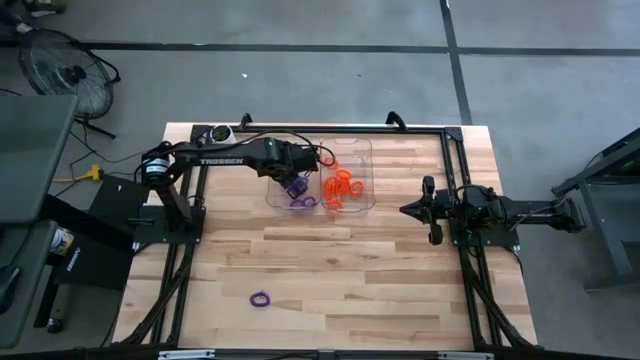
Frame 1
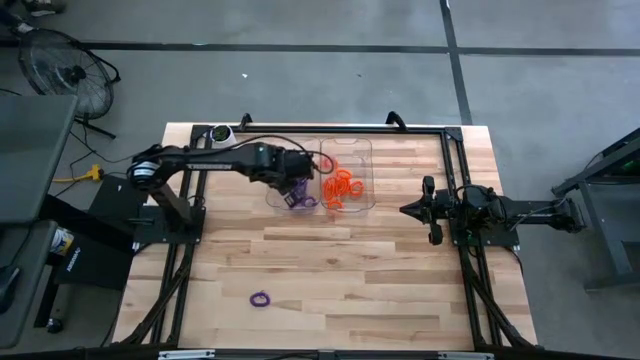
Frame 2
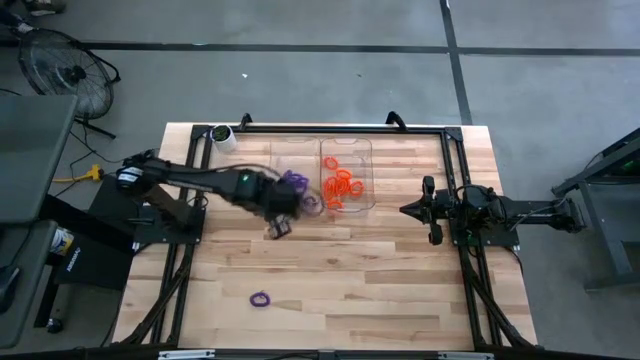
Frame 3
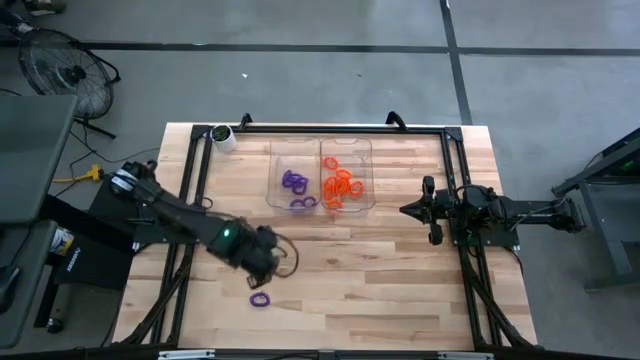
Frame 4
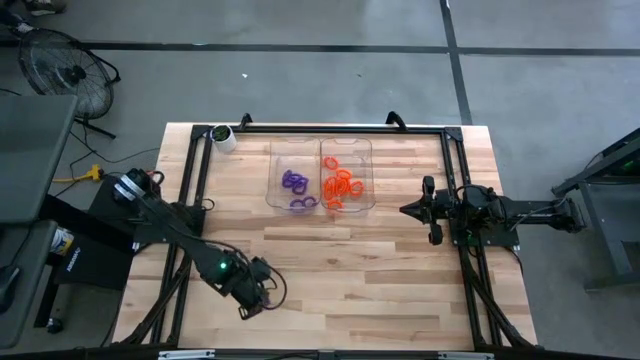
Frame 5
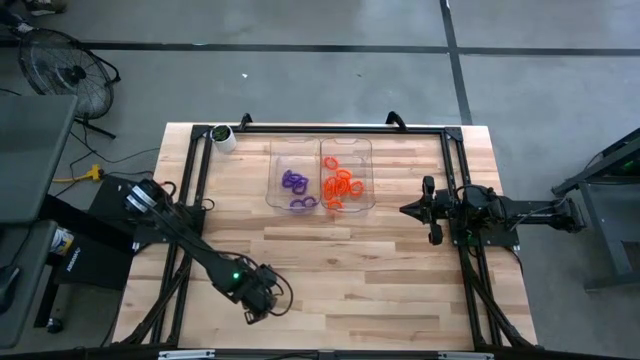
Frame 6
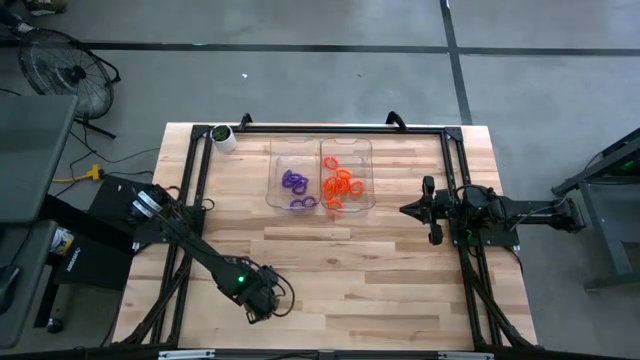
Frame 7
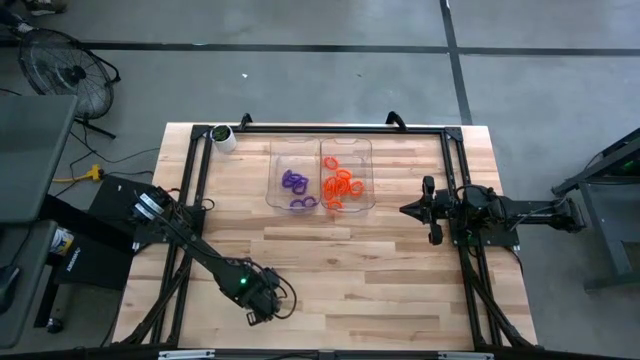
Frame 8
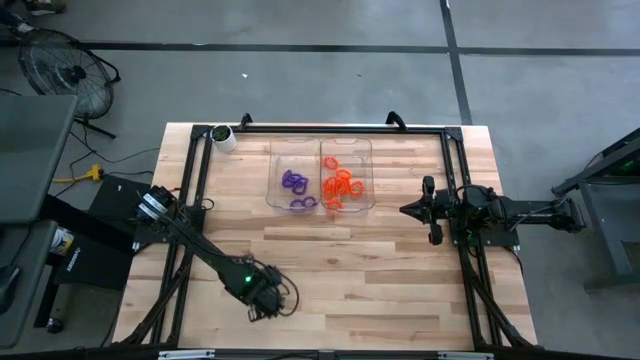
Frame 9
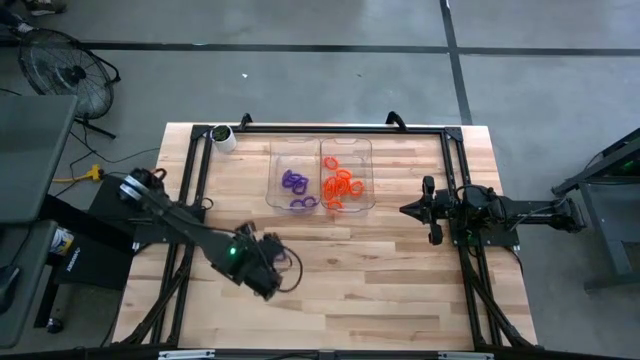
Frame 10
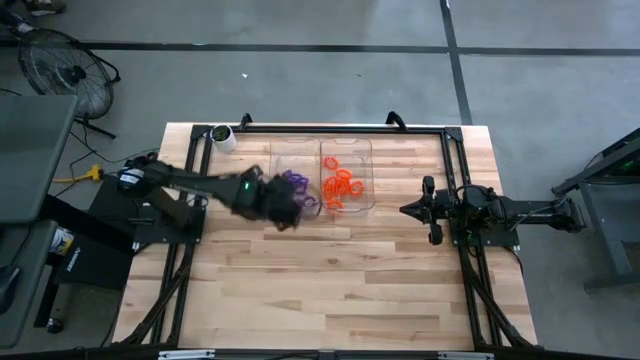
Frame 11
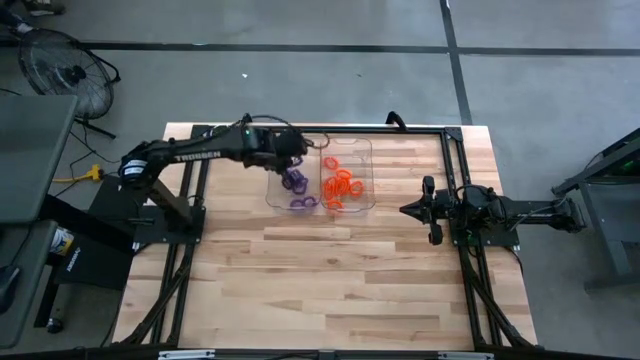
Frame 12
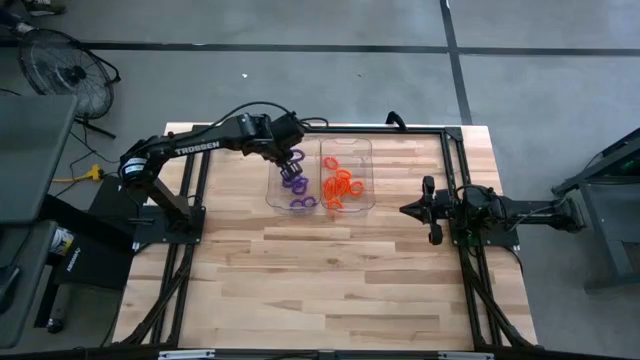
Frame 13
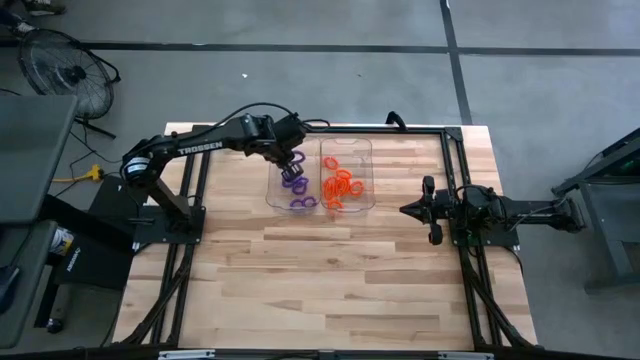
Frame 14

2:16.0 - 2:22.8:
Task: Sort spring keychains
Put the purple spring keychain into the left transparent bin

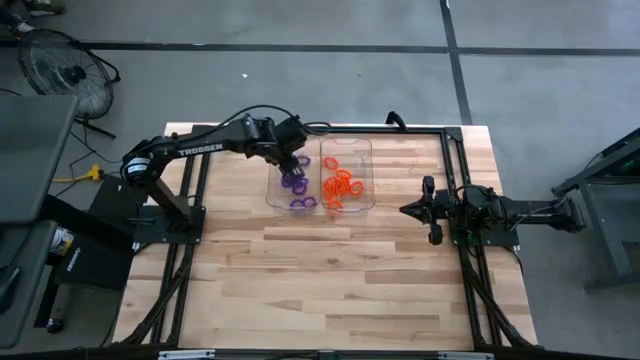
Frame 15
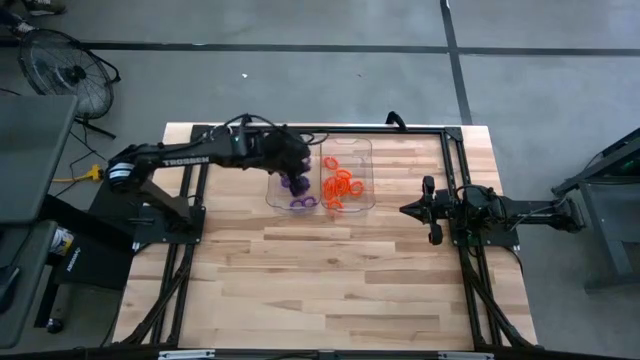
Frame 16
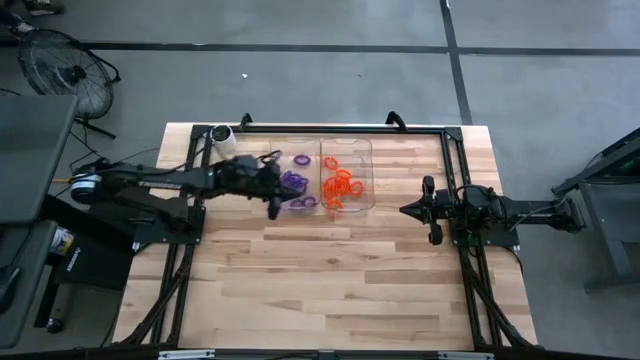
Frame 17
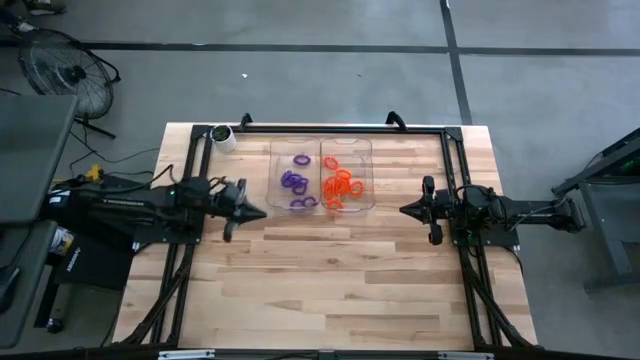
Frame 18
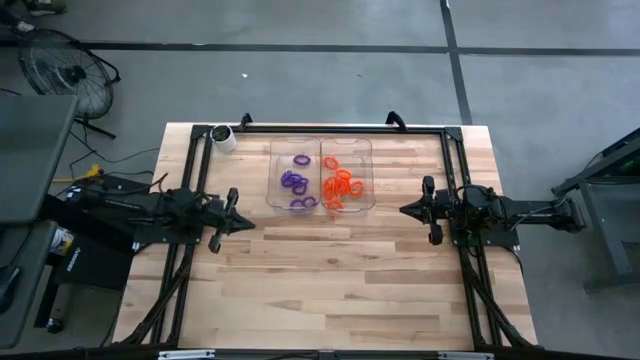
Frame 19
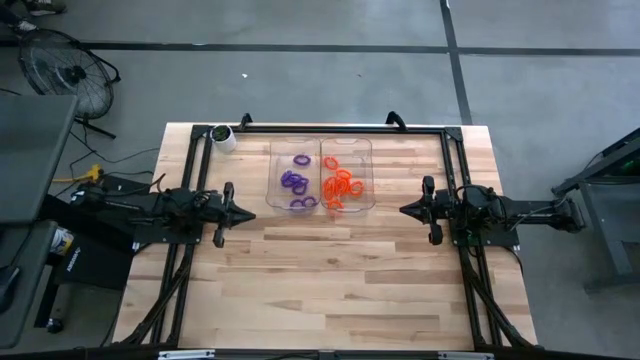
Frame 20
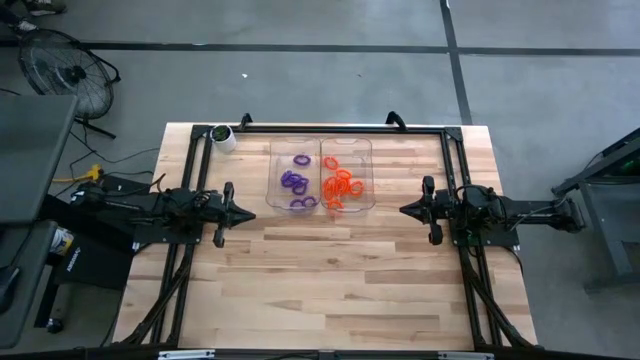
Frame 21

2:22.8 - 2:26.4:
Return to Home Position

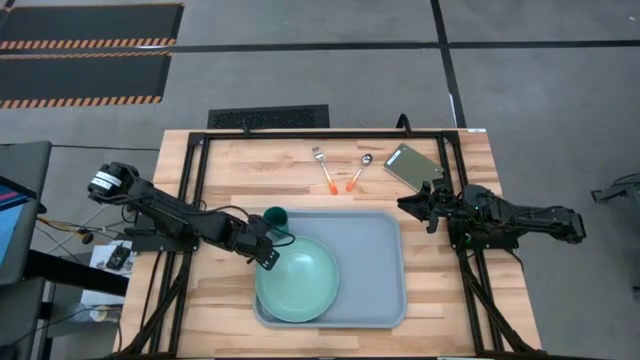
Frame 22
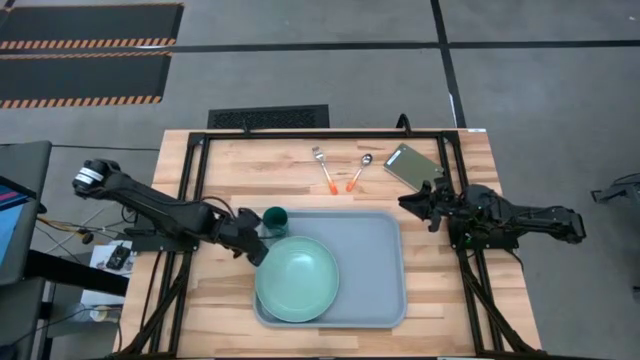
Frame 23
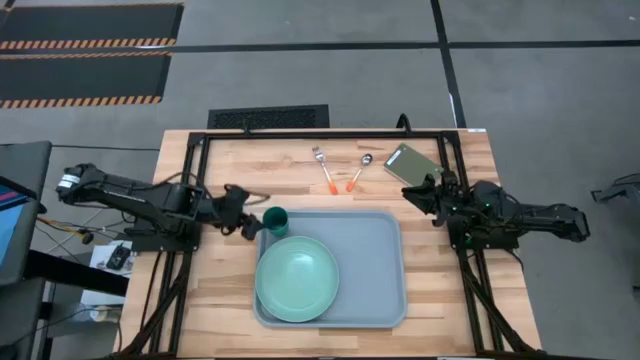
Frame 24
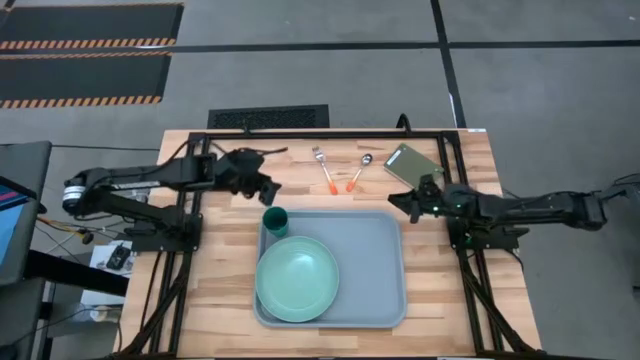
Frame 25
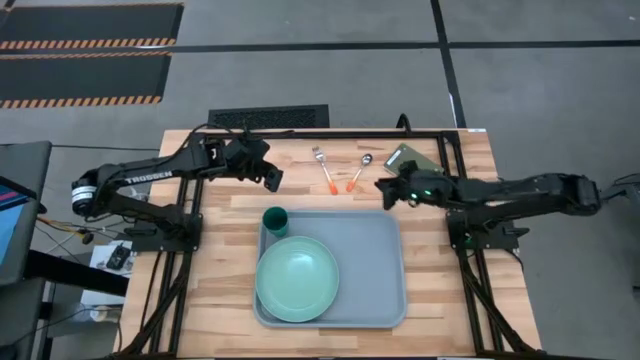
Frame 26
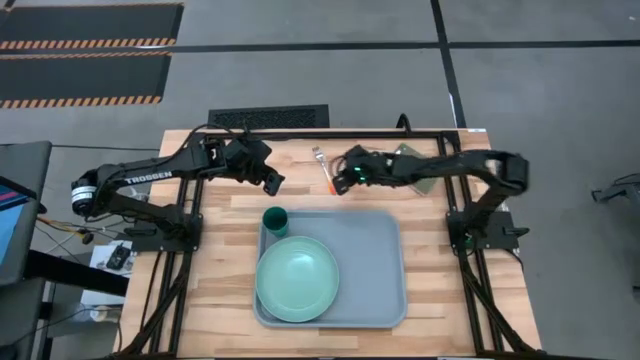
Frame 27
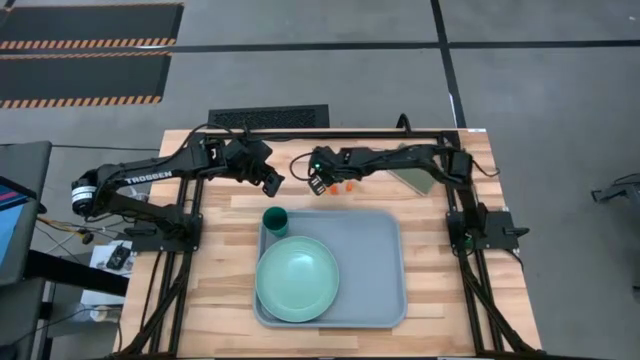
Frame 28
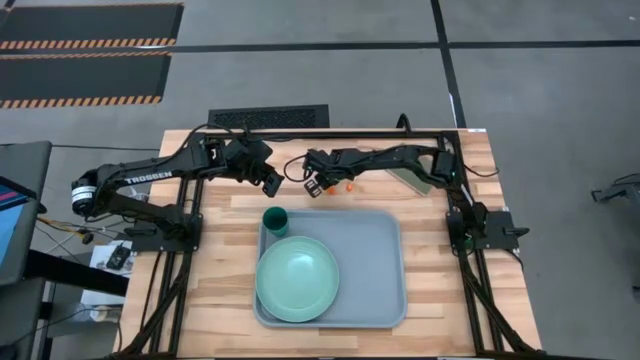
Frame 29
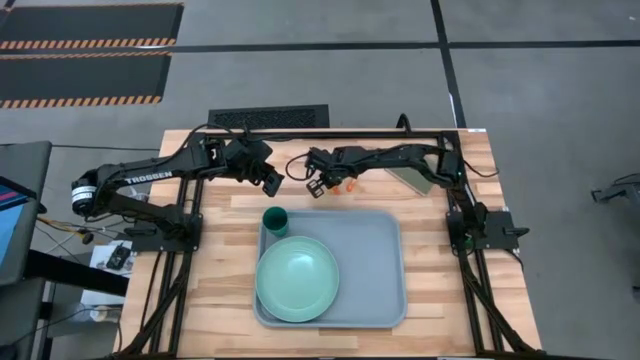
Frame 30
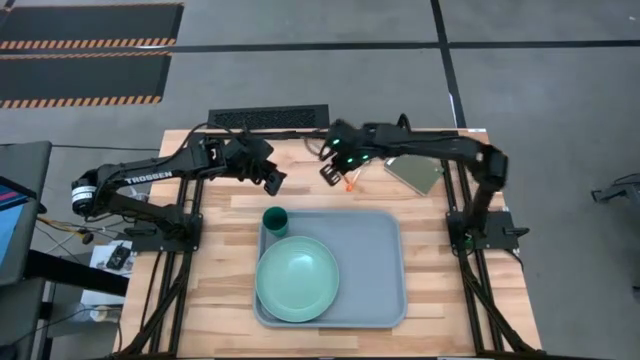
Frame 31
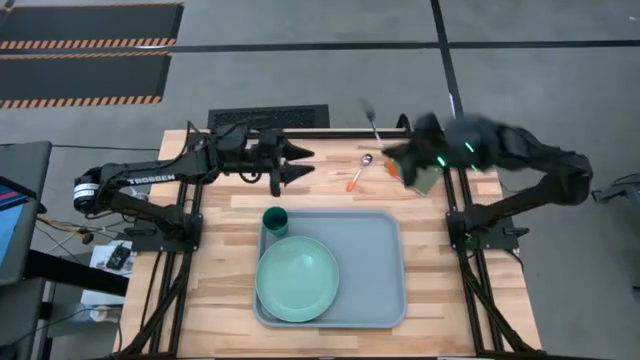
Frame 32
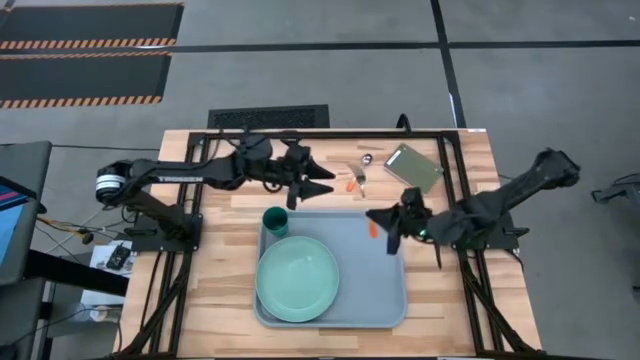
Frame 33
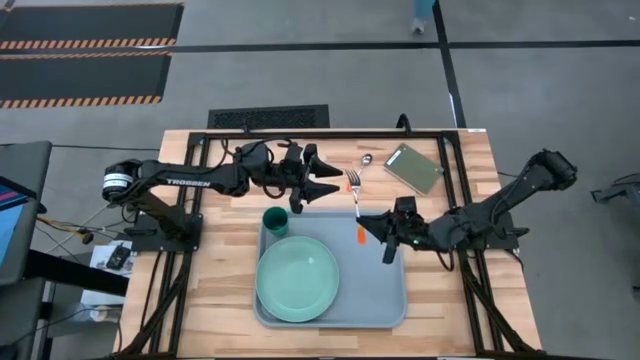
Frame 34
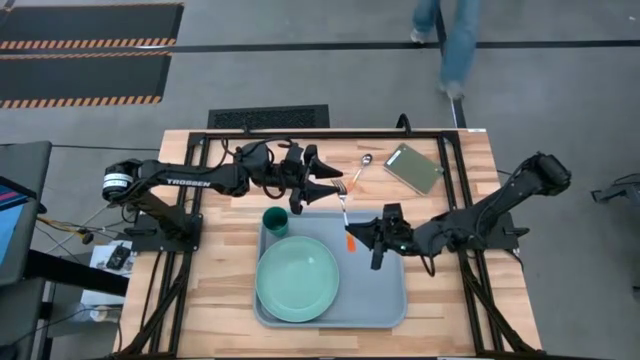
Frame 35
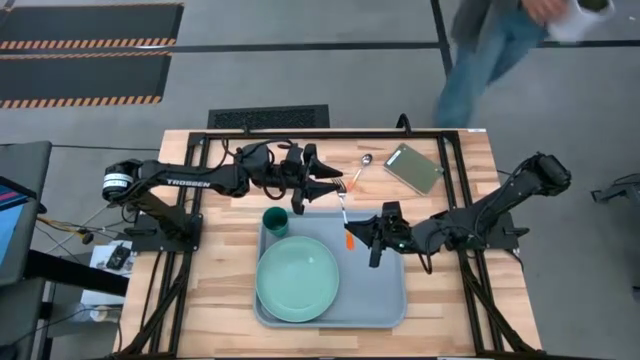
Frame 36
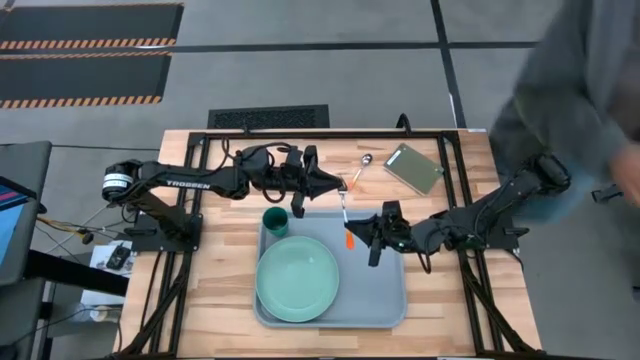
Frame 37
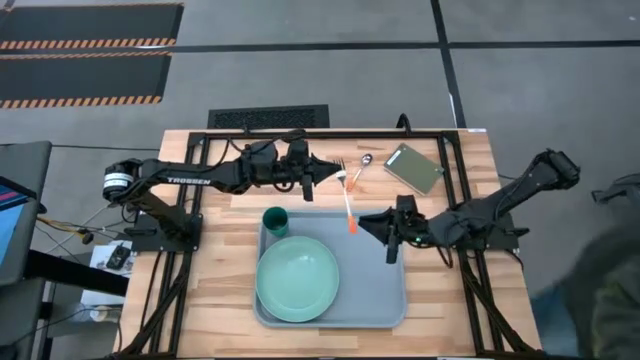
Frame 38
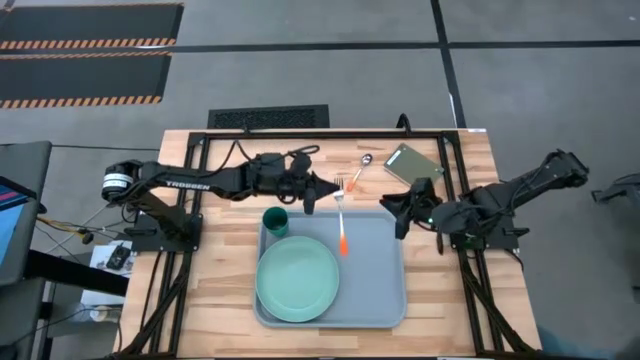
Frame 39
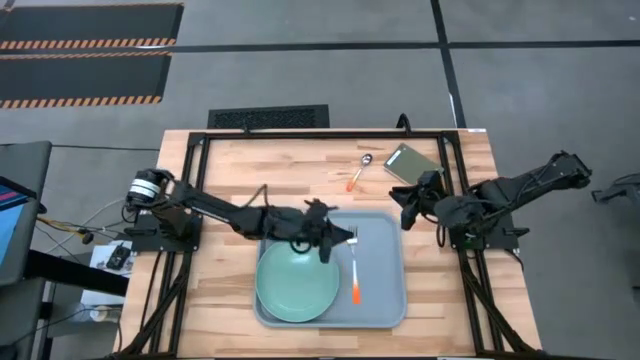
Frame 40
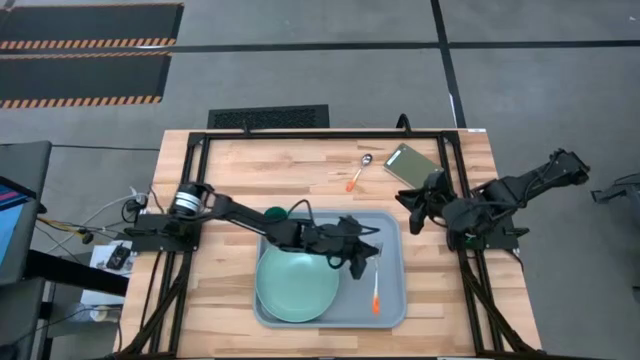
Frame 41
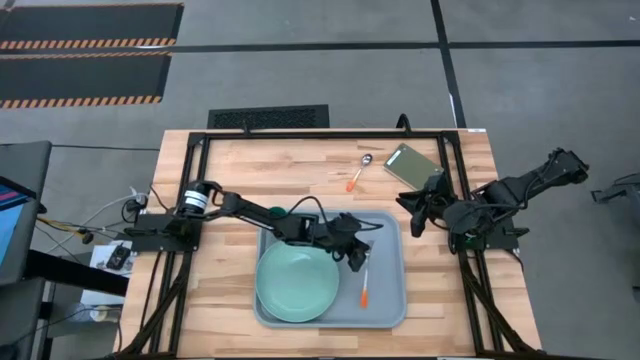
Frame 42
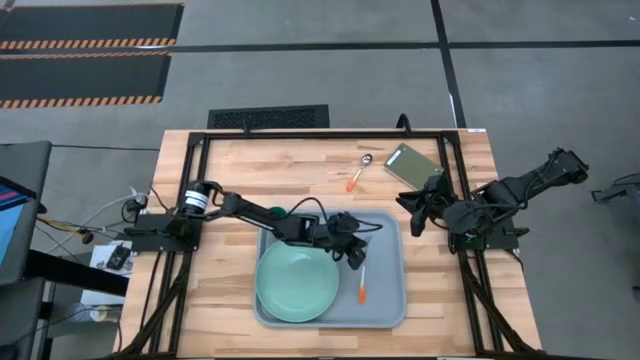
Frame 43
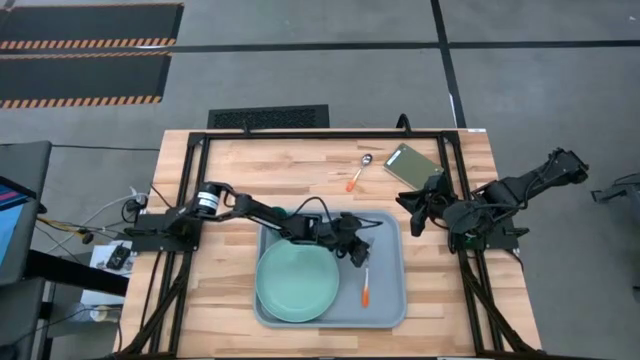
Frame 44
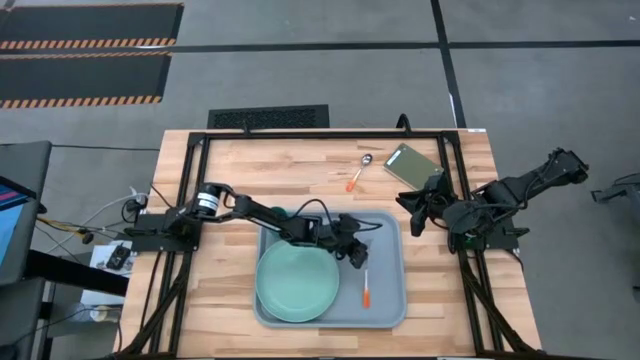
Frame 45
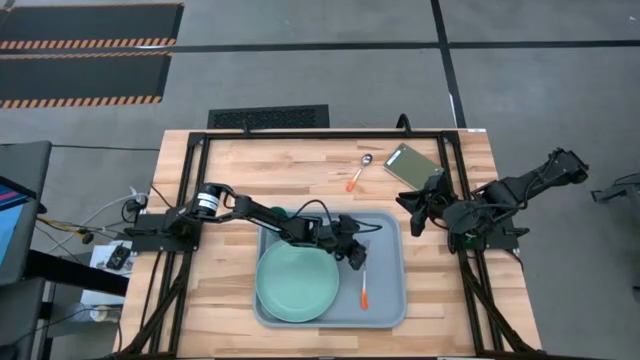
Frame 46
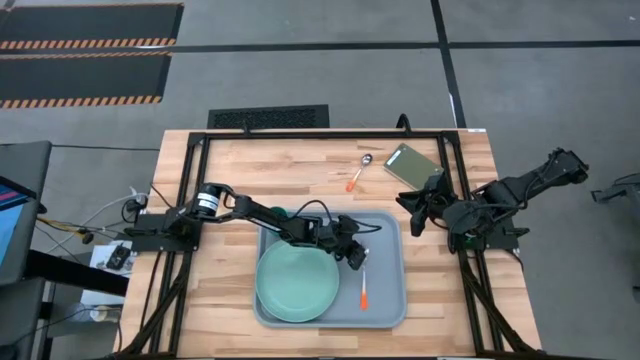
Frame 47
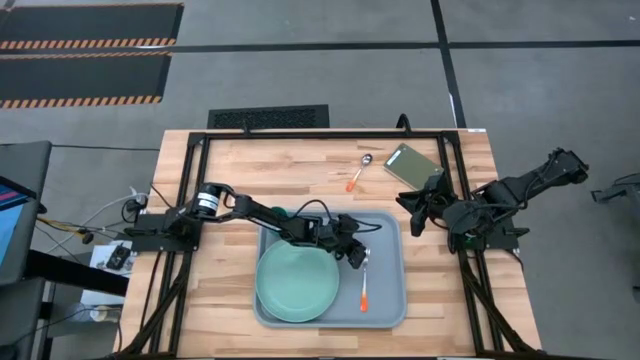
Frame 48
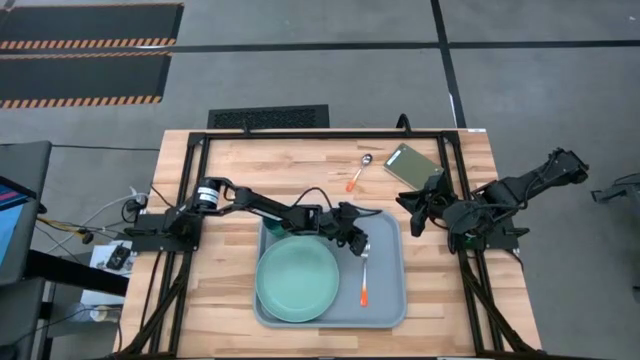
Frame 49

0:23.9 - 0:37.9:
Task: Pick and place plate/cup/fork/spoon on tray
Put the orange fork on the gray tray to the right of the green plate
